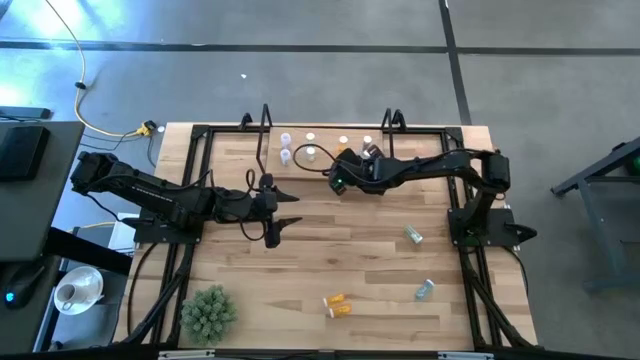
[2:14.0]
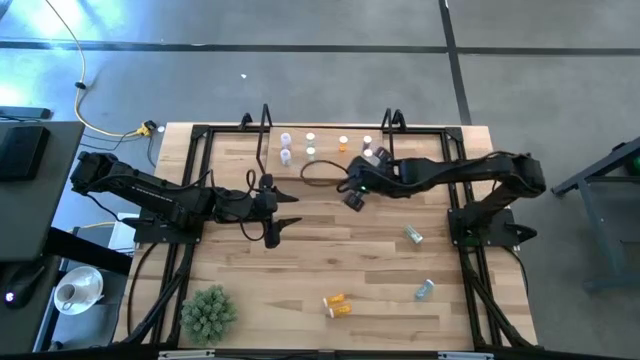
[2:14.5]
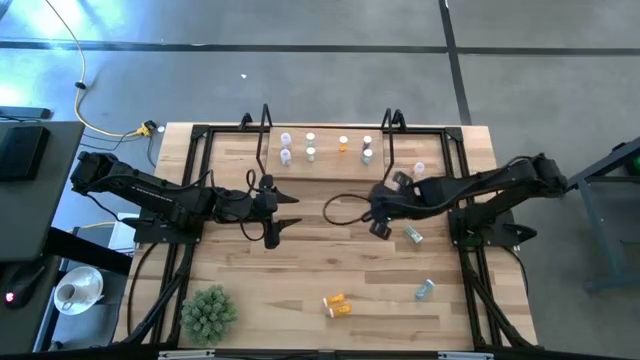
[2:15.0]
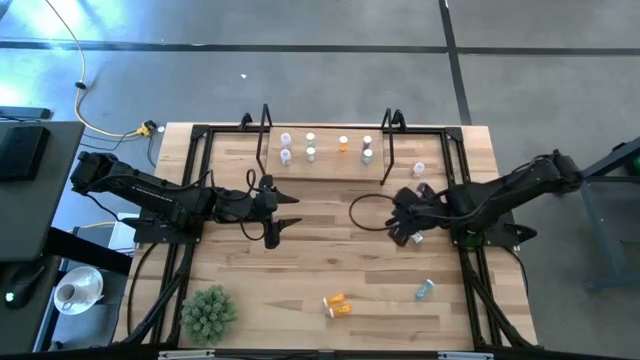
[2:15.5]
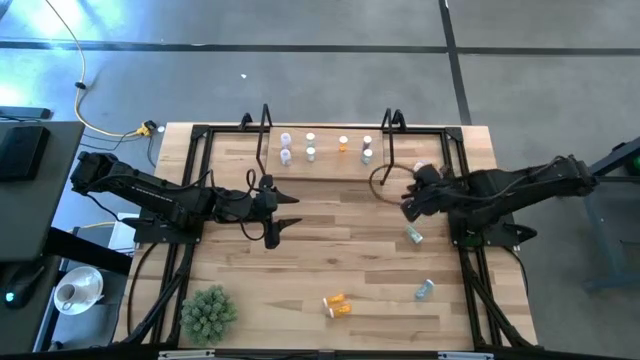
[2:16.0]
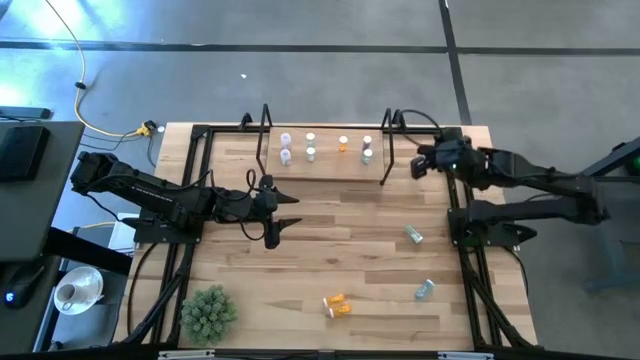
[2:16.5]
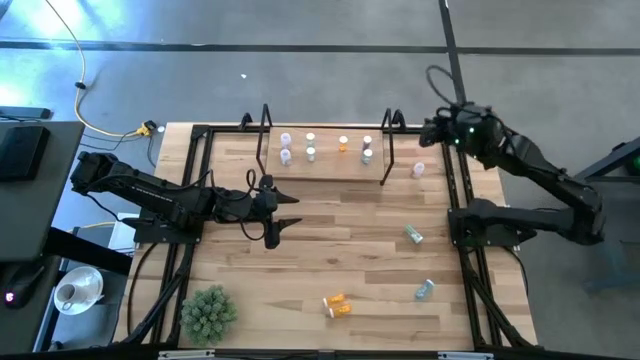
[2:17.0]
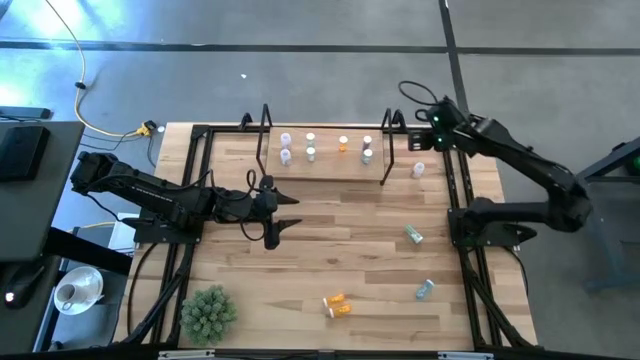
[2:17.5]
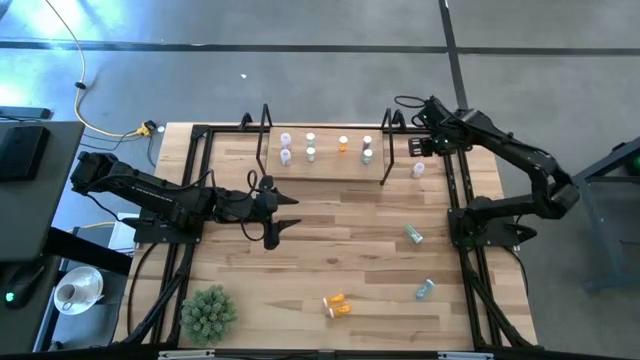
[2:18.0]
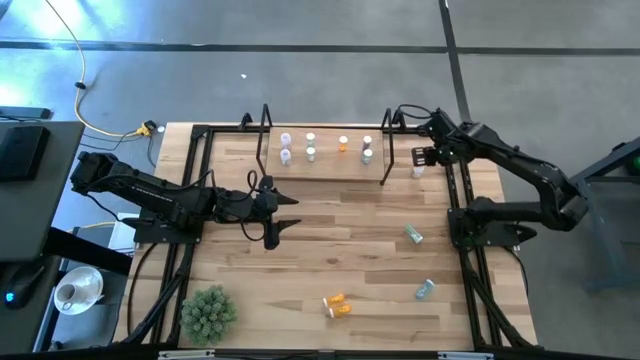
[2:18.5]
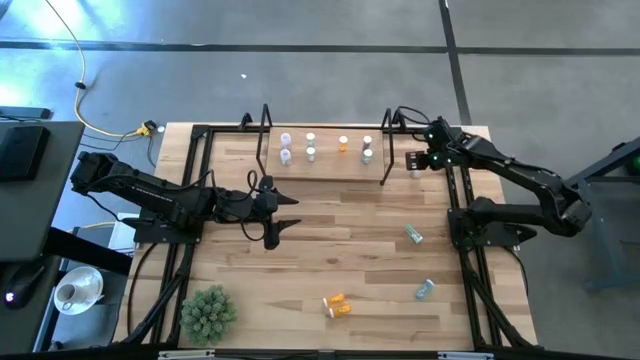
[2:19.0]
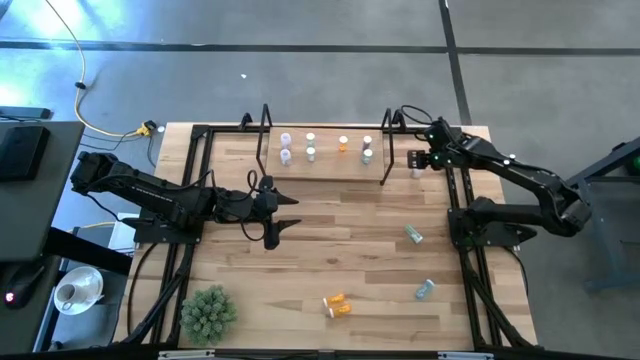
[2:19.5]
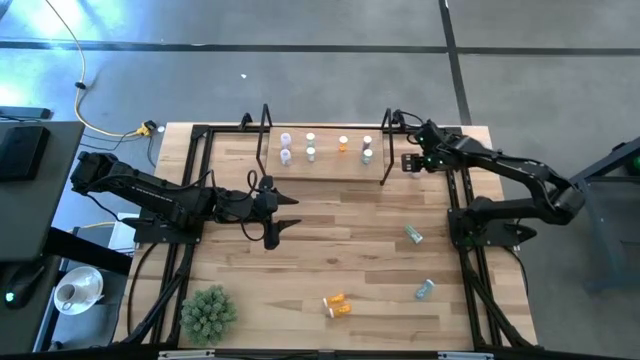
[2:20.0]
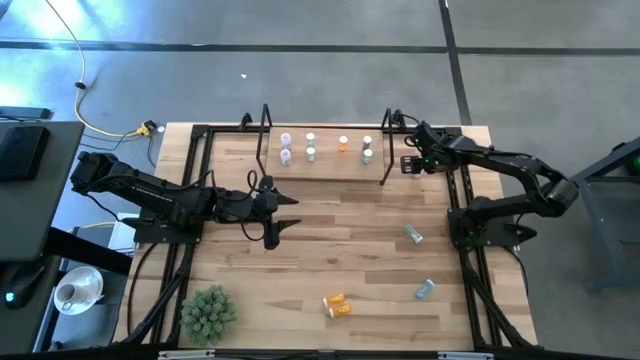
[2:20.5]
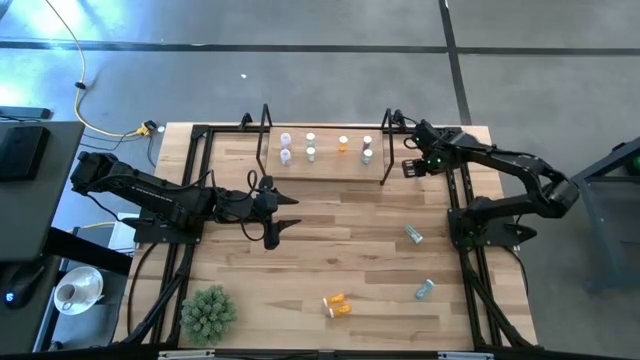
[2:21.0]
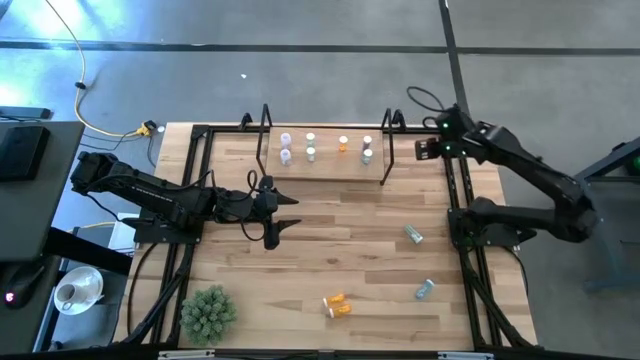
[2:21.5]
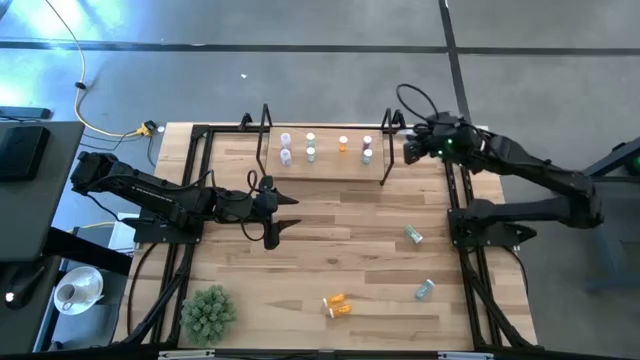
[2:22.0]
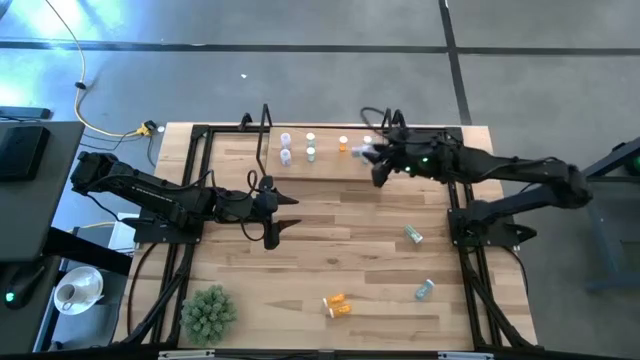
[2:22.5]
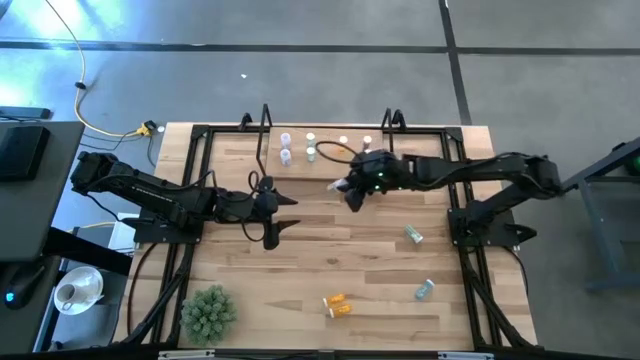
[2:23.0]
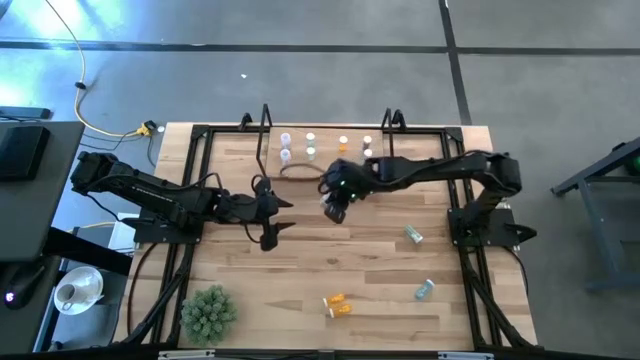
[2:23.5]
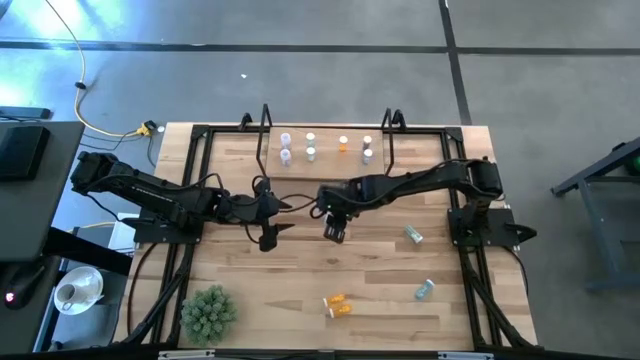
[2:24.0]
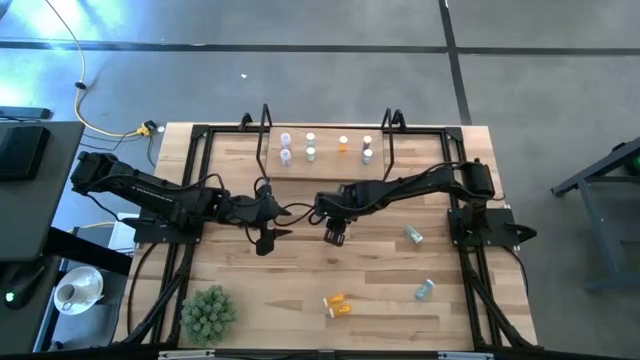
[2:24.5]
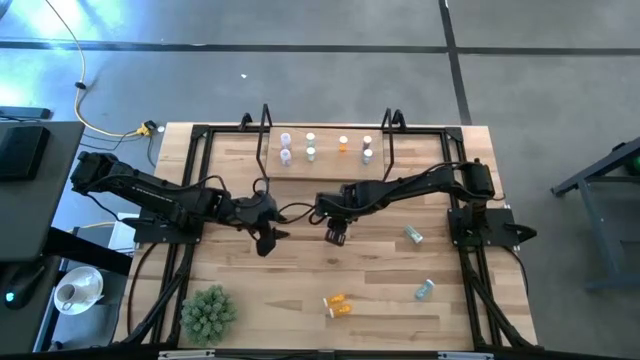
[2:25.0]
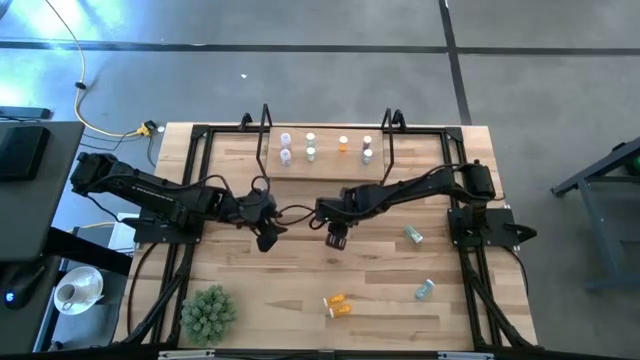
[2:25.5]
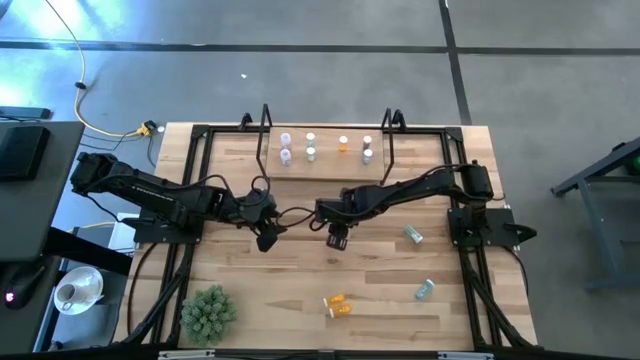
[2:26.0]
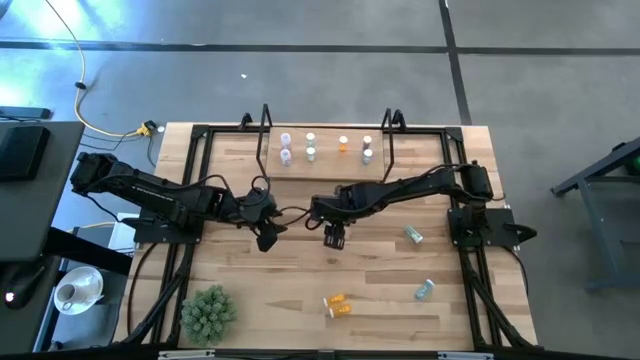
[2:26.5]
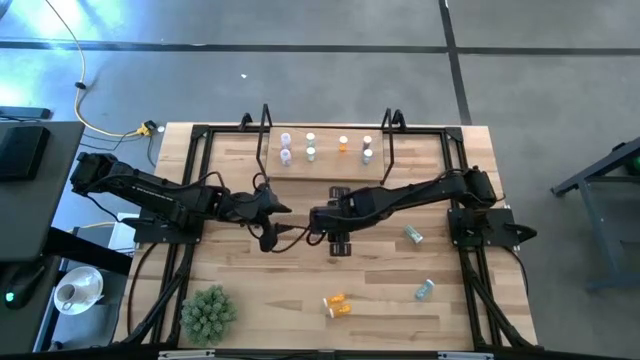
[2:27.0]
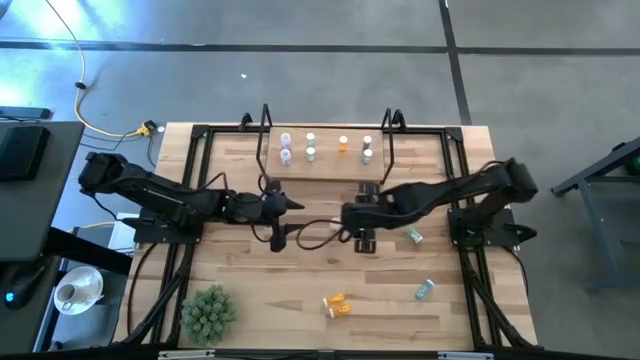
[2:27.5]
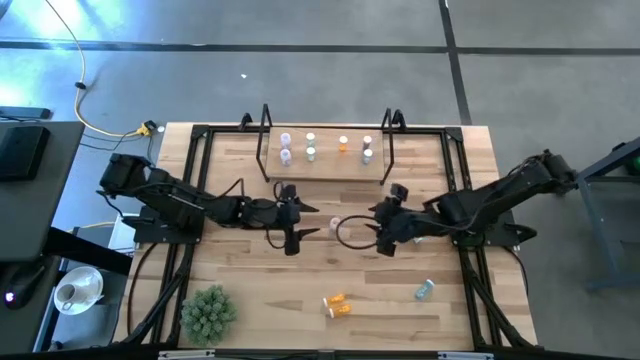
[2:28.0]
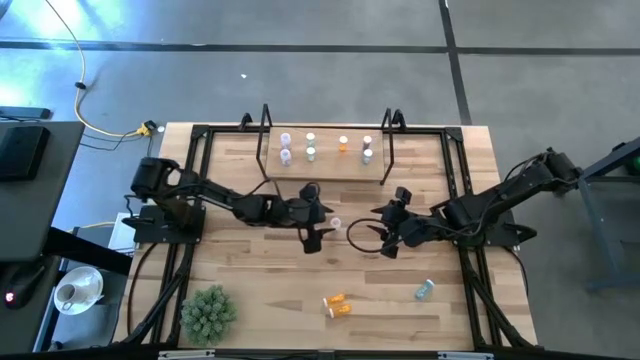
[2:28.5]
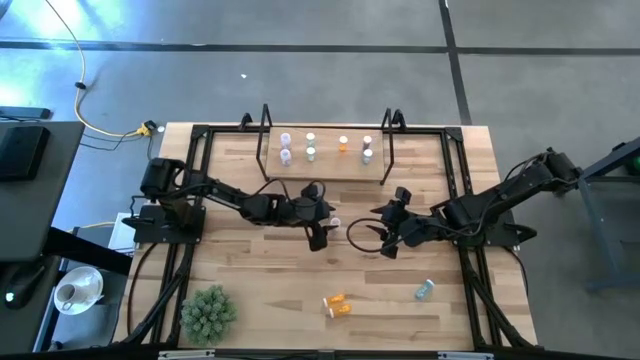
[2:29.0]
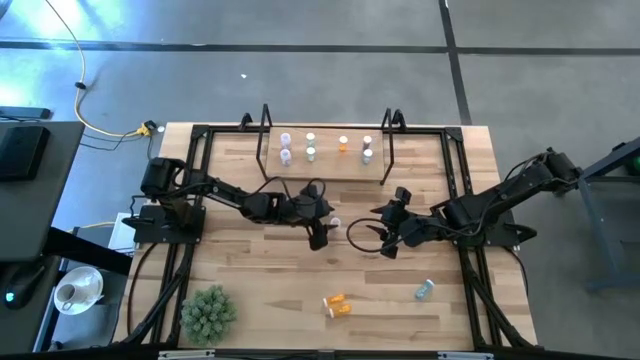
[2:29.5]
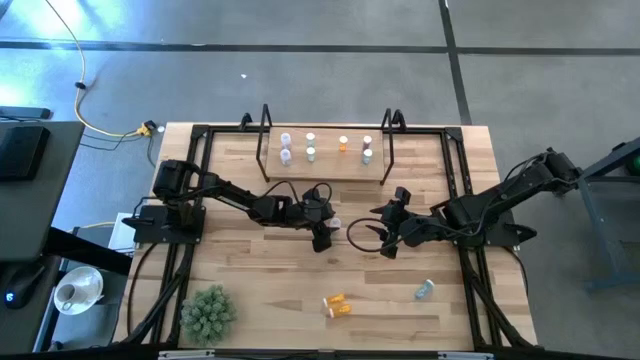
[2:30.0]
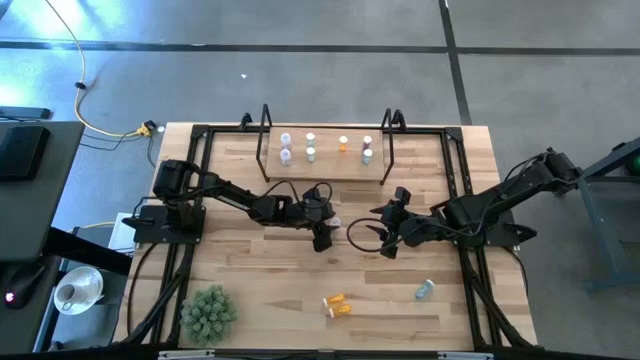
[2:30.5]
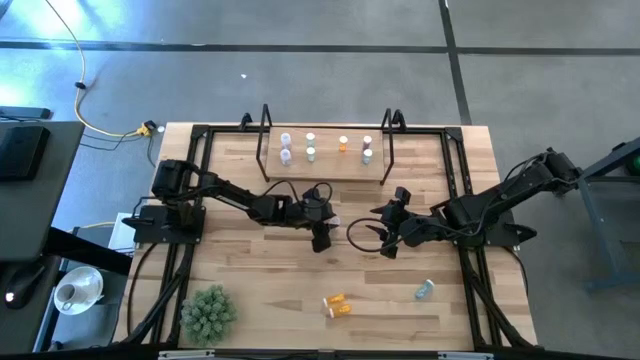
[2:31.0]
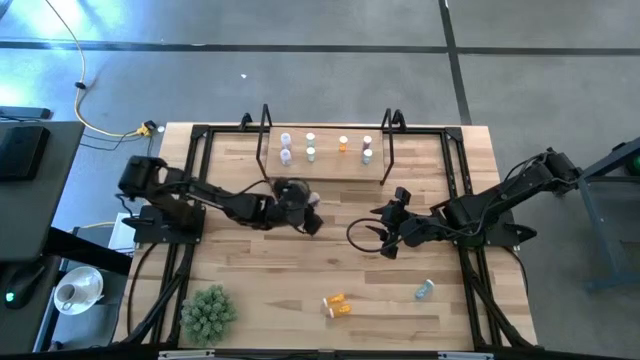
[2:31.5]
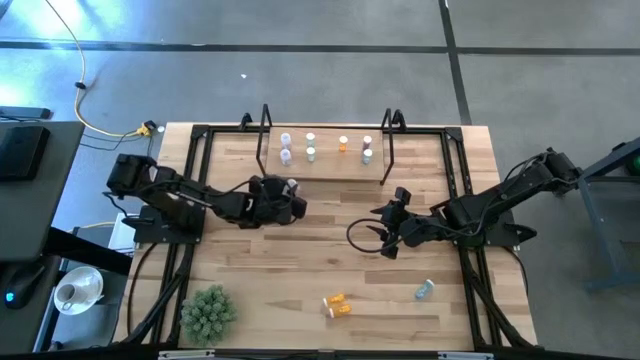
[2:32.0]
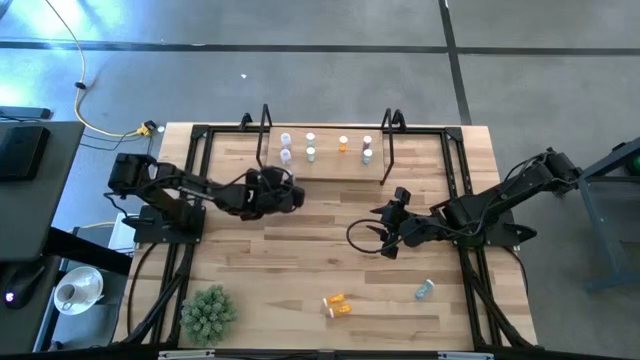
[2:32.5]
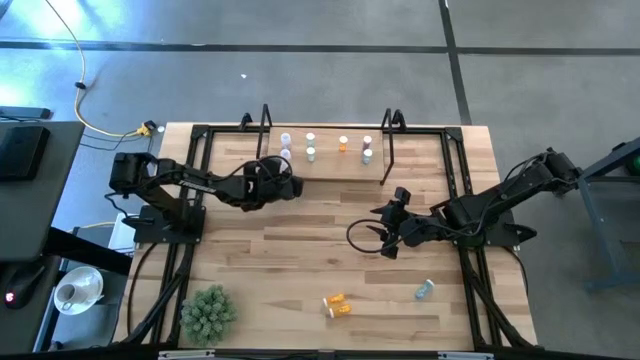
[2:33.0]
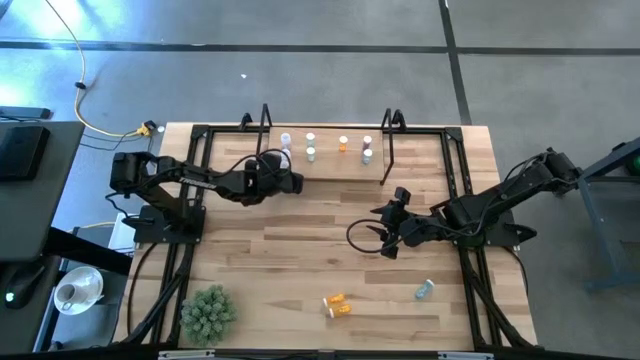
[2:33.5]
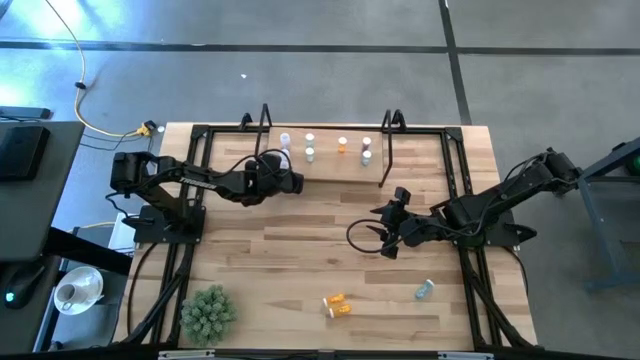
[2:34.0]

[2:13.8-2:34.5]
Task: Pick and place medicine bottles onto shelf by color
Put the white pill bottle on the shelf aligned with the other white pill bottles
